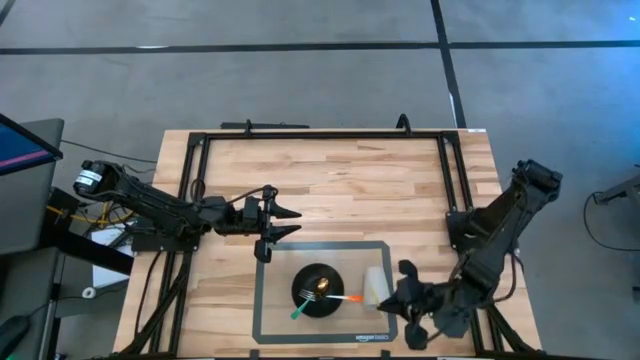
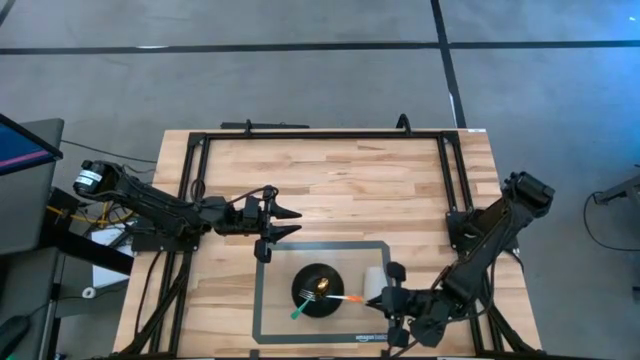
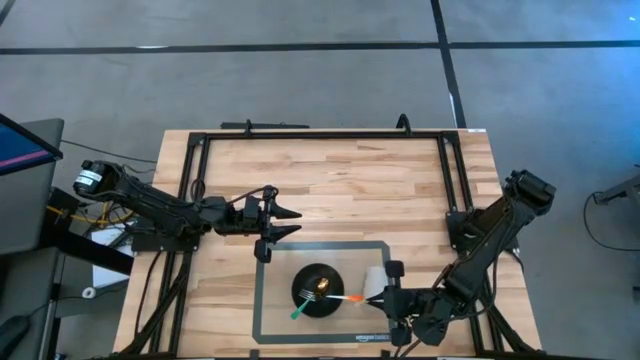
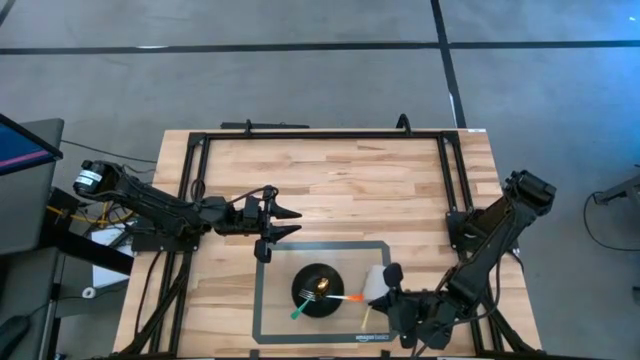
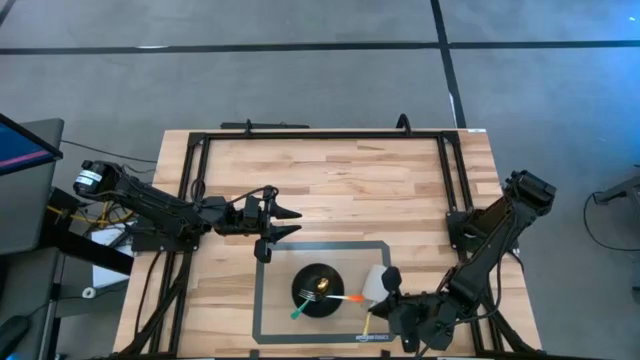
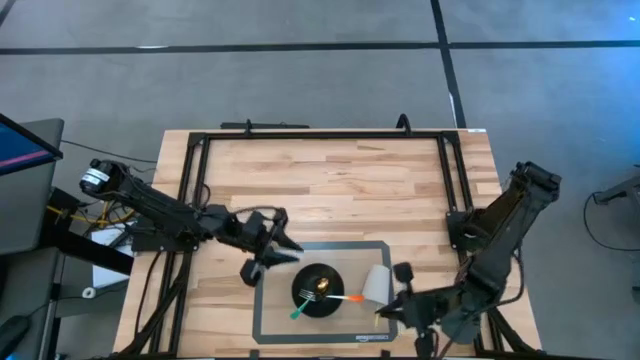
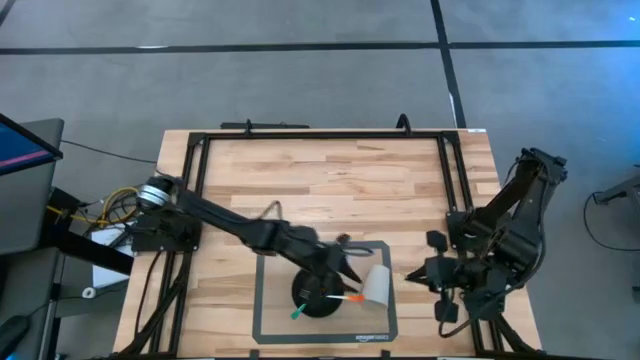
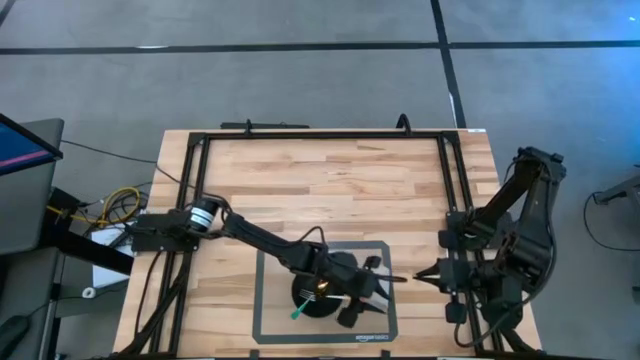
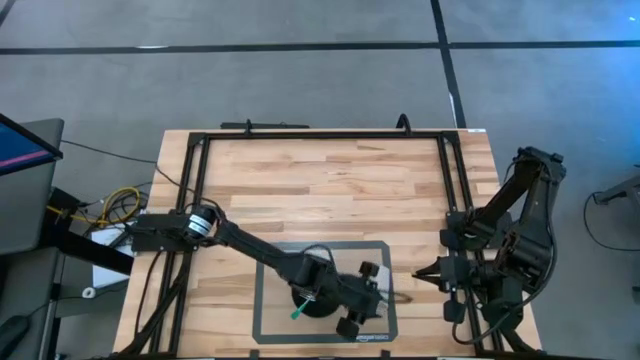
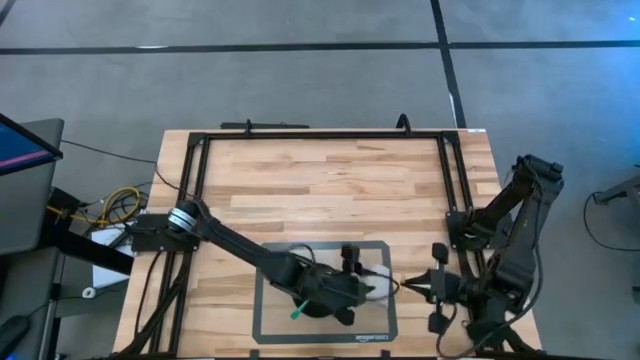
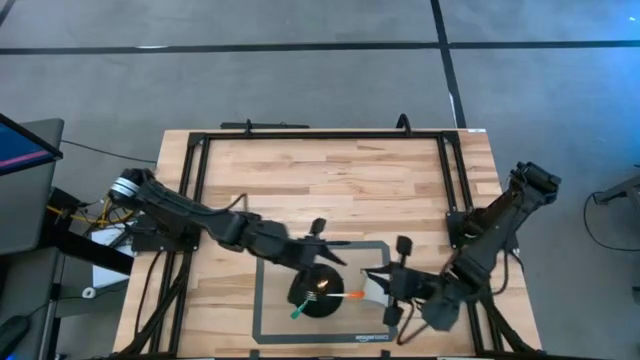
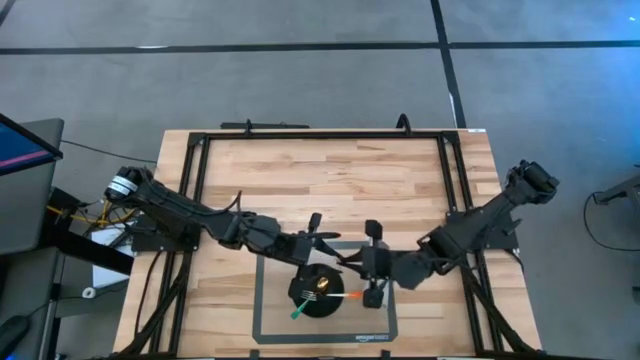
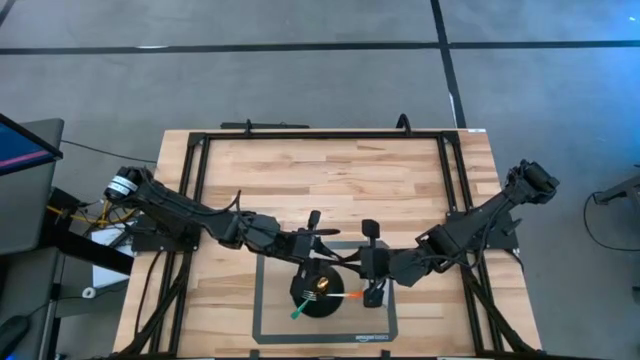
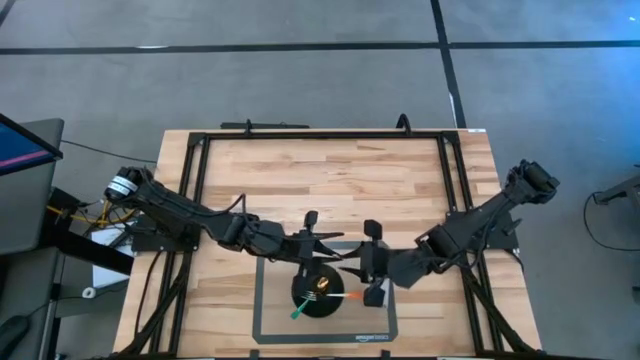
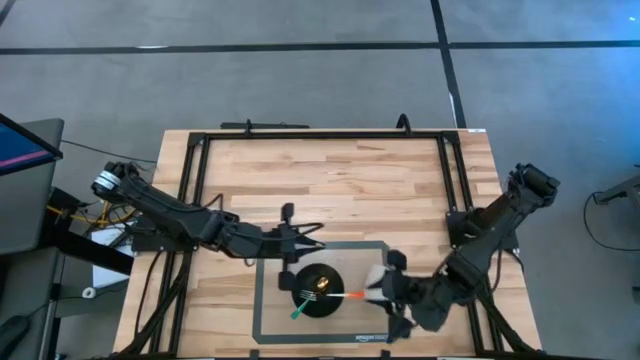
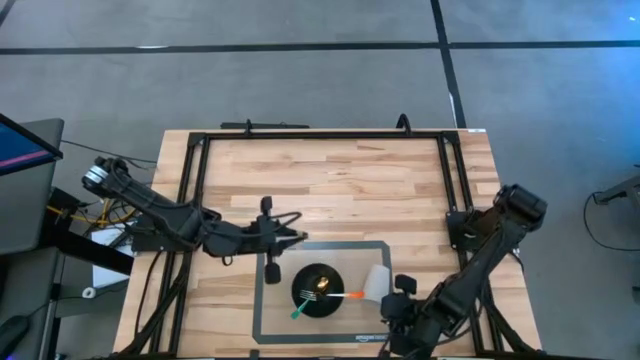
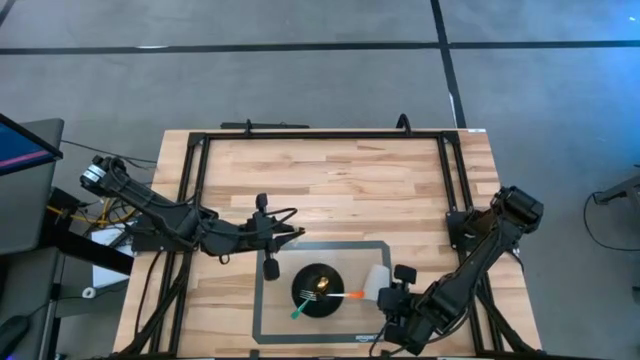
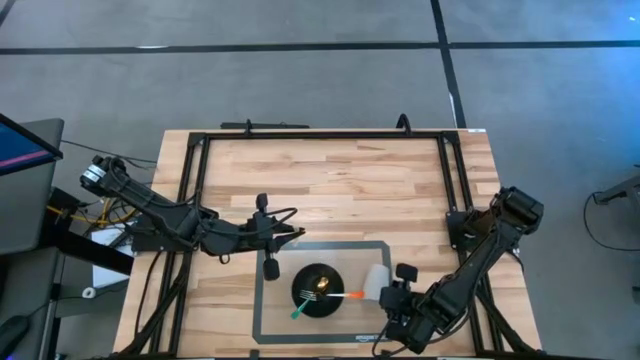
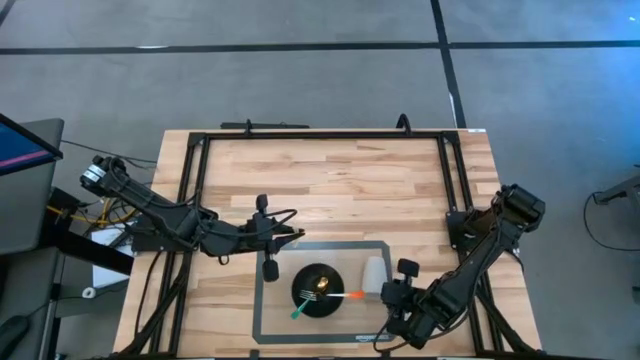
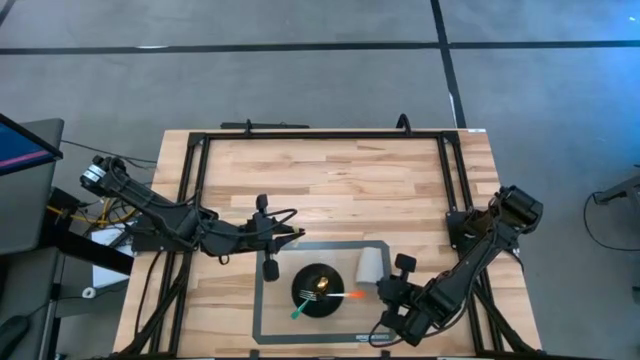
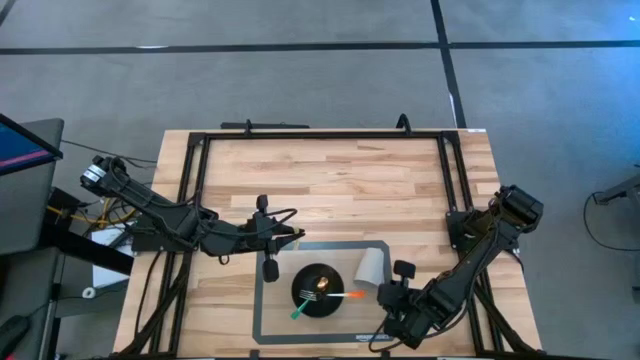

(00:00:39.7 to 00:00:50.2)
Task: Pick & Place Utensil
Adjust the white cup

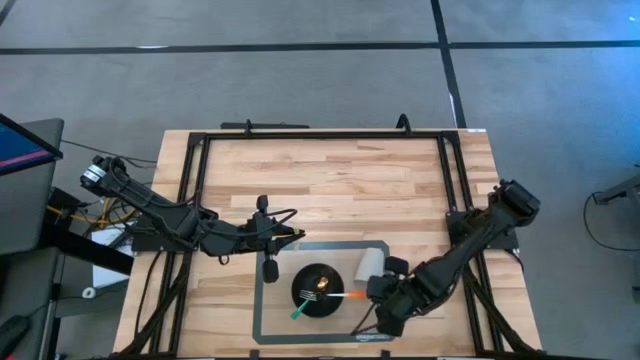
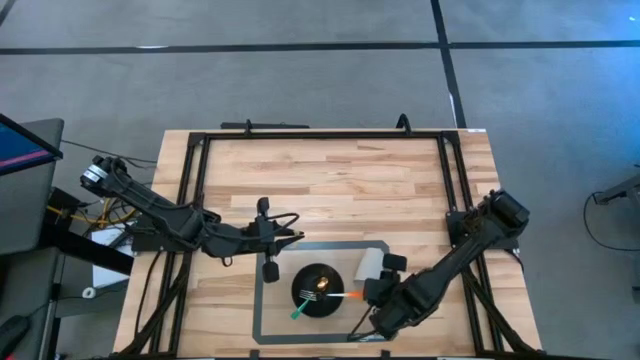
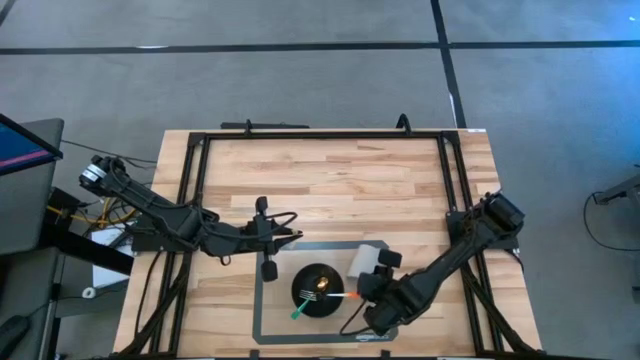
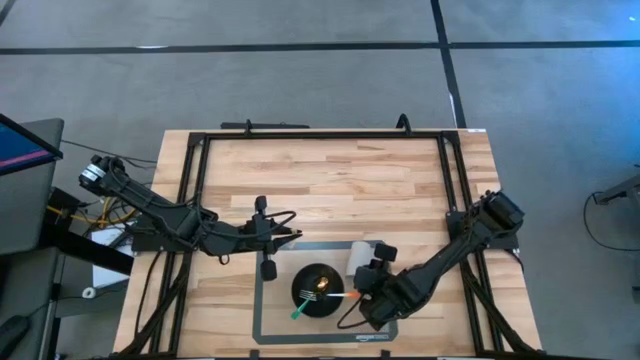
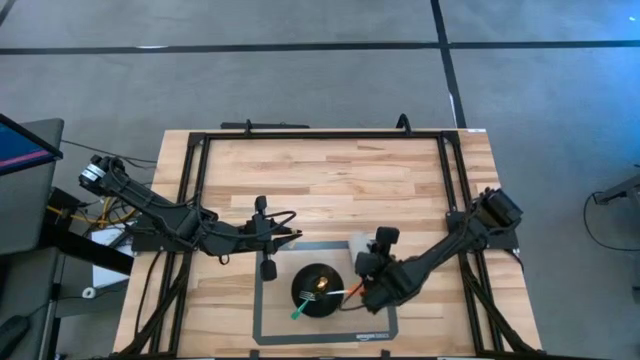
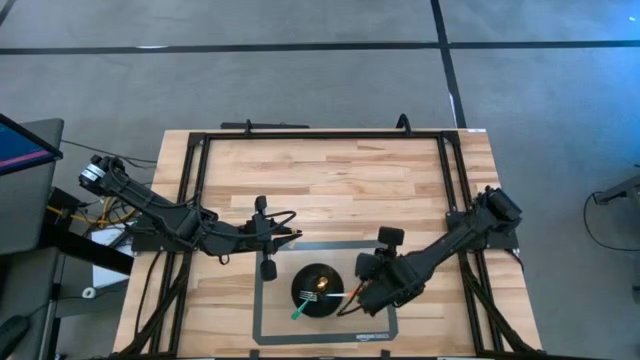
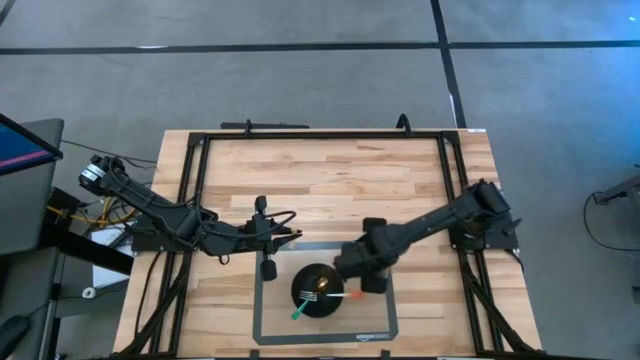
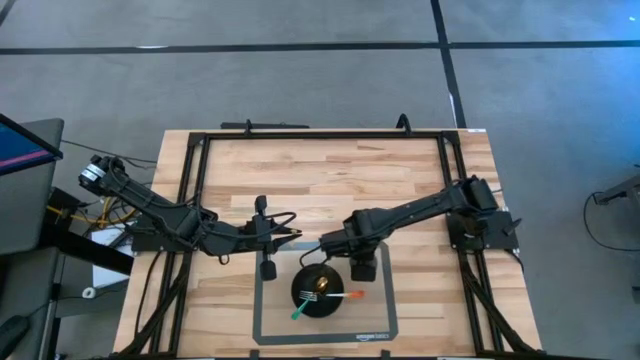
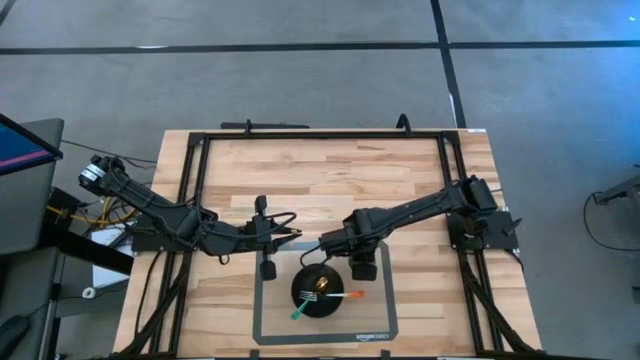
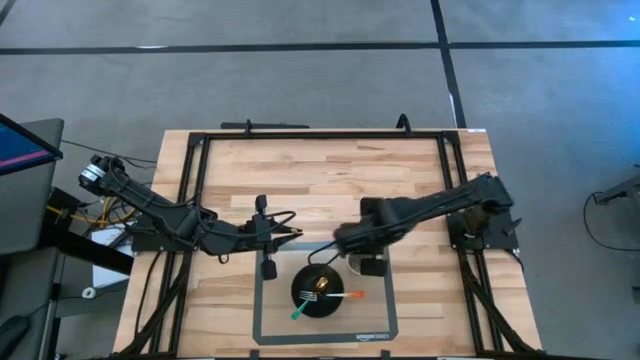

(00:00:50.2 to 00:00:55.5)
Adjust the white cup

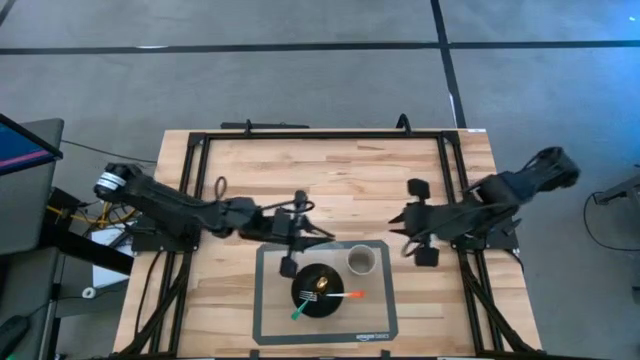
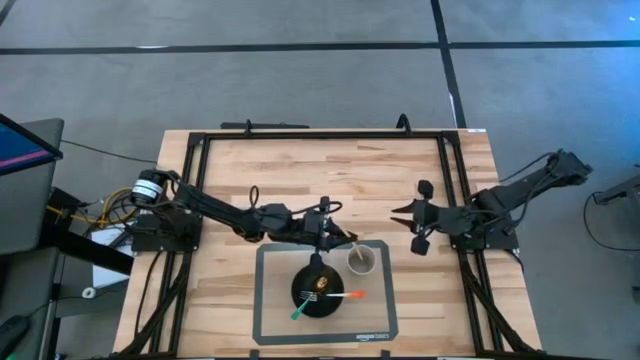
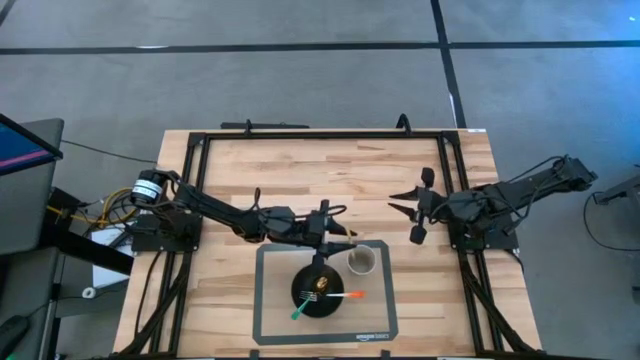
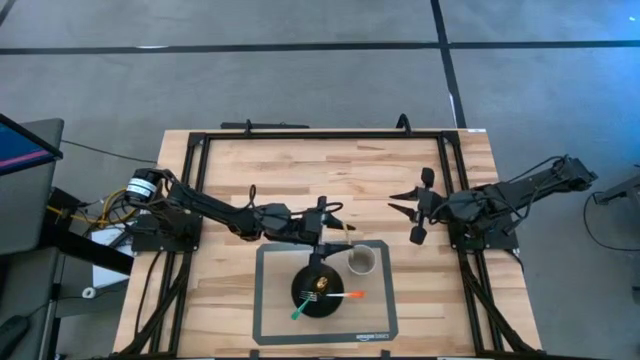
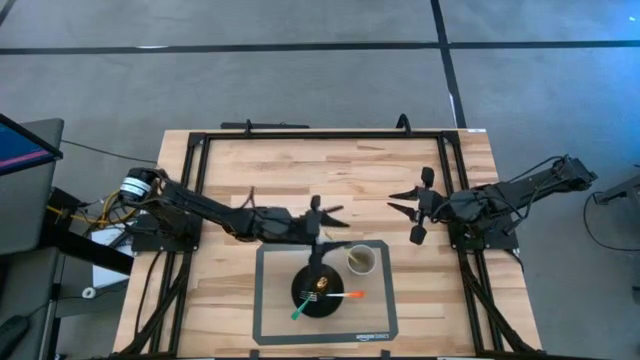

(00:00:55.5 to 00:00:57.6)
Put the yellow straw into the the white cup

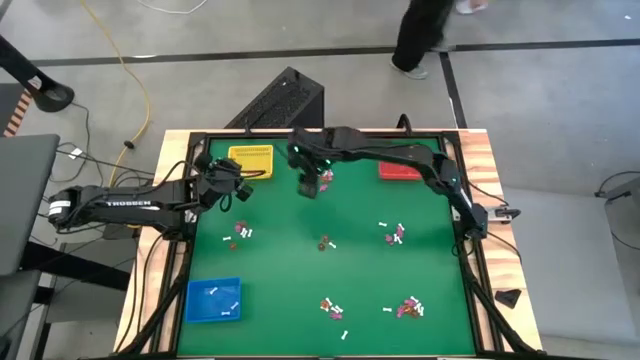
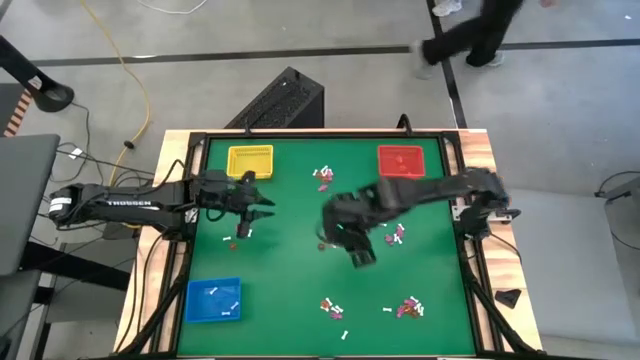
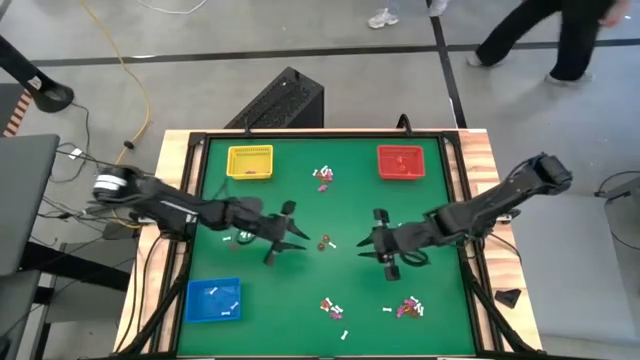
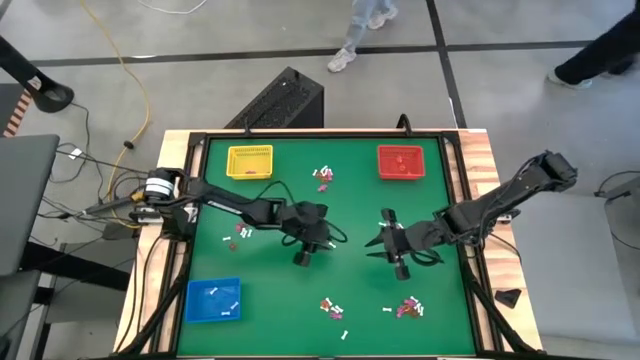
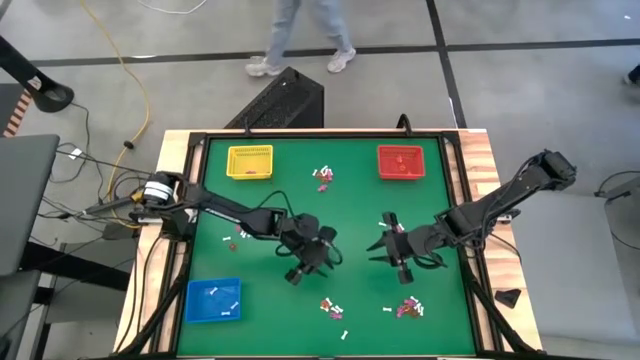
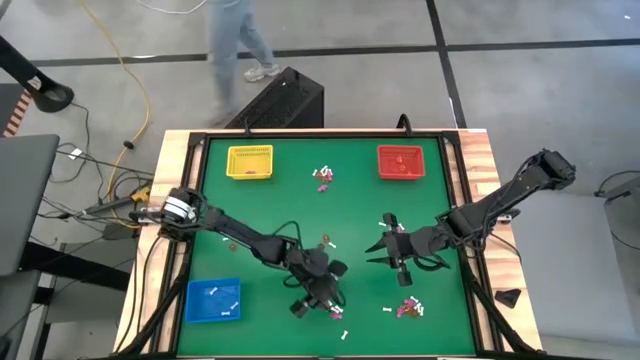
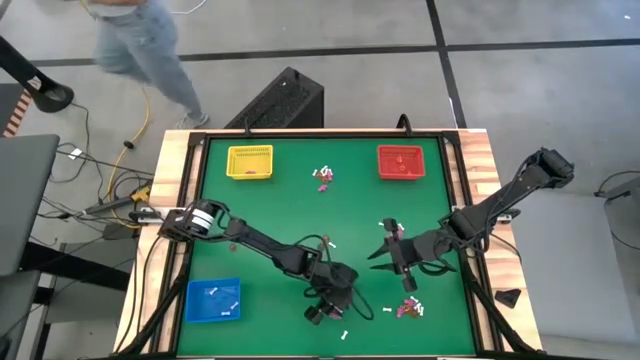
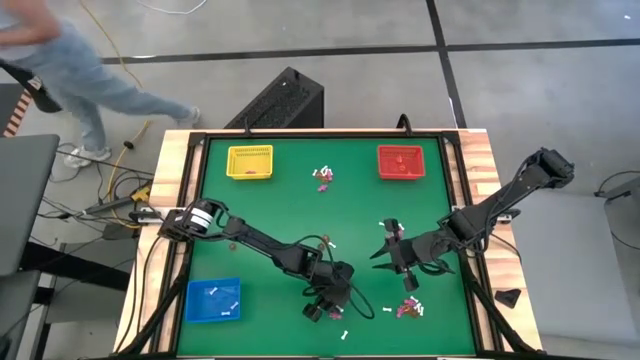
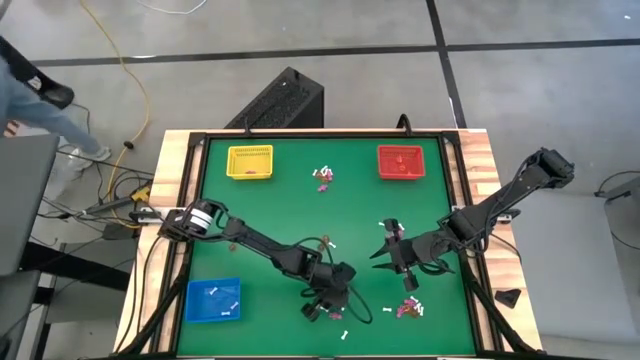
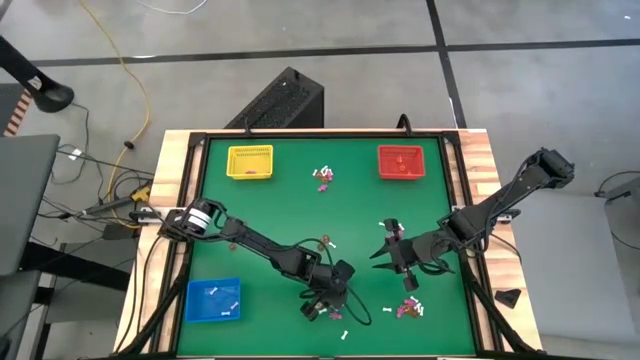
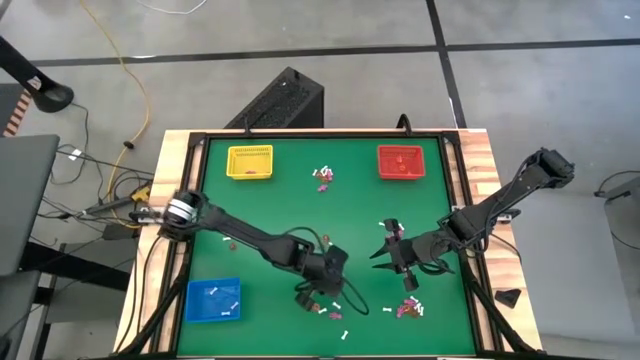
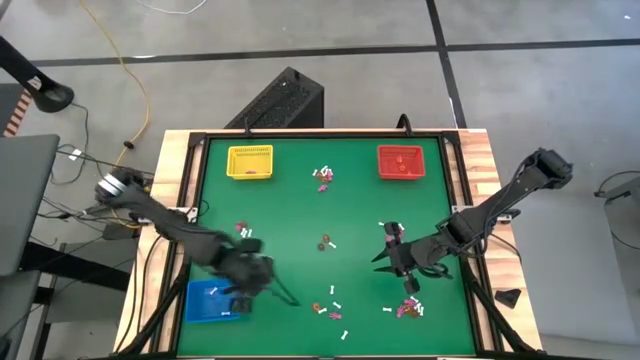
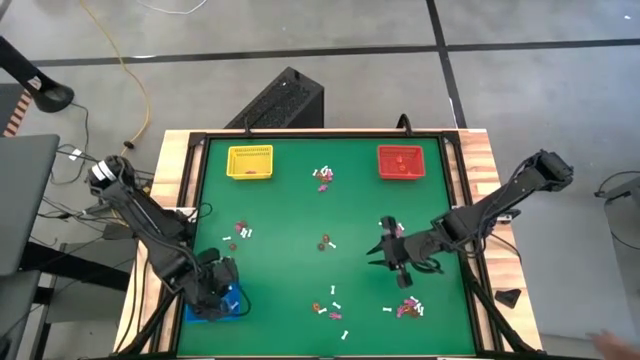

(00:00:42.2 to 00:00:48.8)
Task: Sort Halloween decoration
Put the white bone toy into the blue bin
